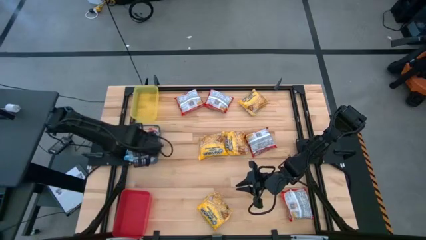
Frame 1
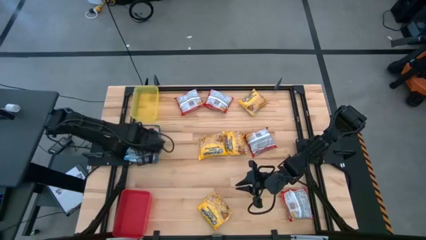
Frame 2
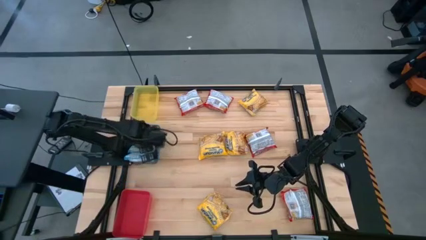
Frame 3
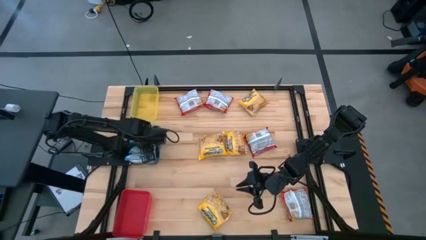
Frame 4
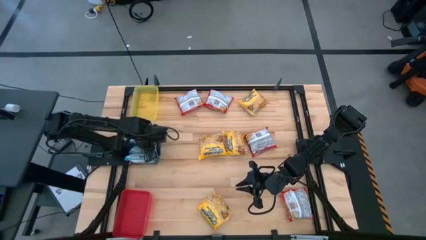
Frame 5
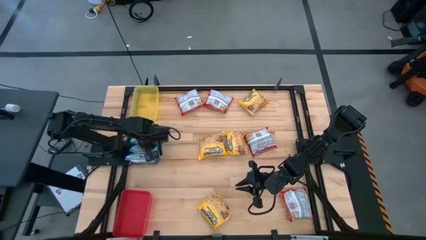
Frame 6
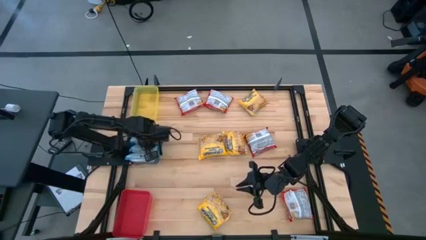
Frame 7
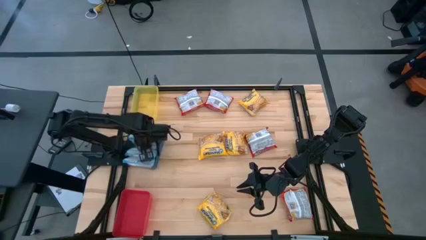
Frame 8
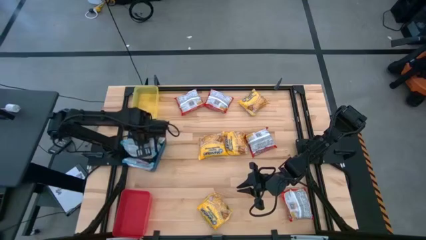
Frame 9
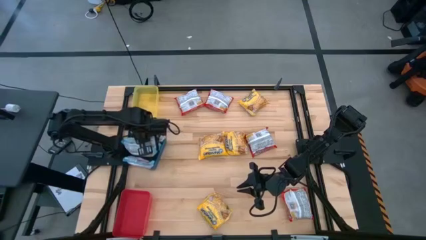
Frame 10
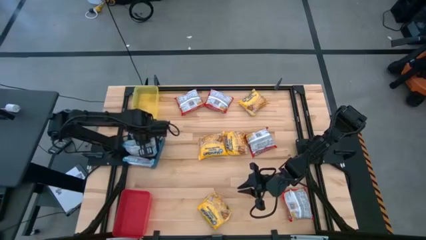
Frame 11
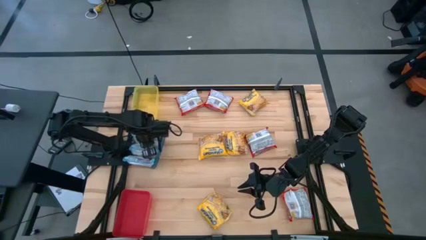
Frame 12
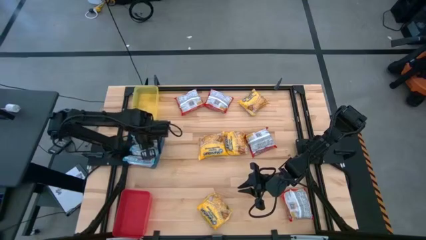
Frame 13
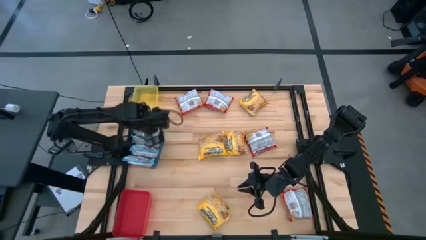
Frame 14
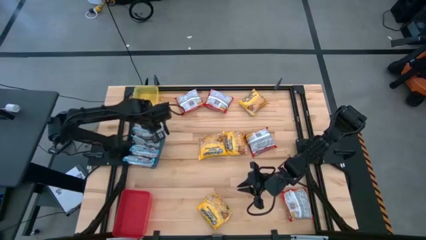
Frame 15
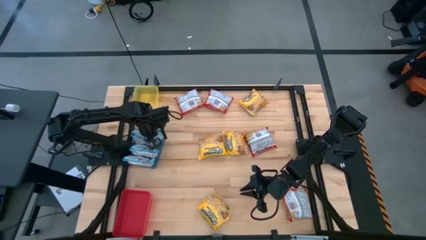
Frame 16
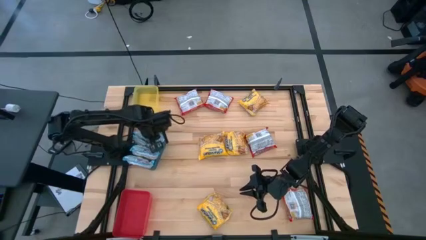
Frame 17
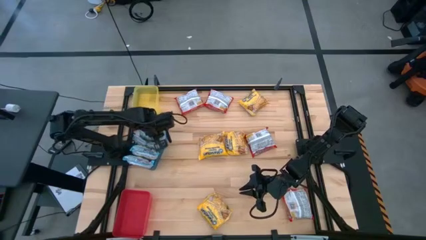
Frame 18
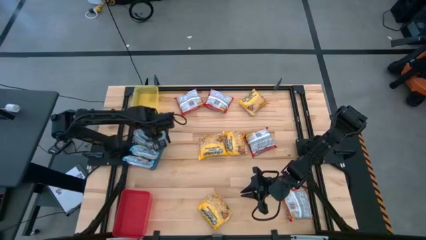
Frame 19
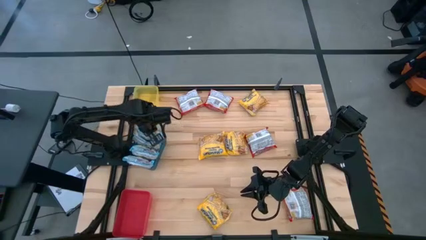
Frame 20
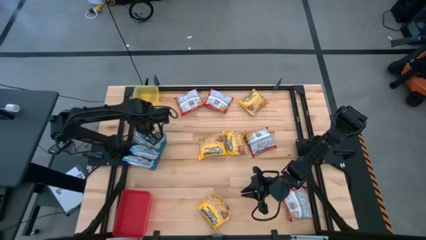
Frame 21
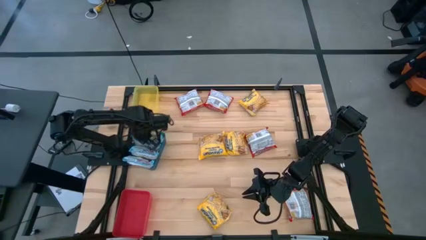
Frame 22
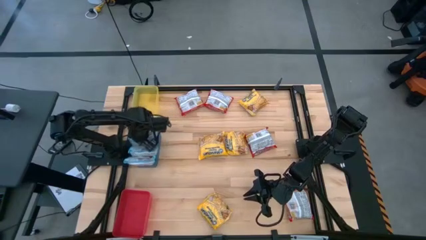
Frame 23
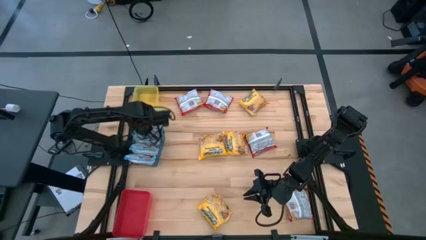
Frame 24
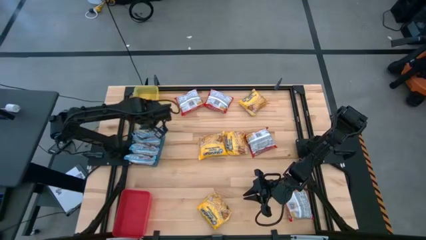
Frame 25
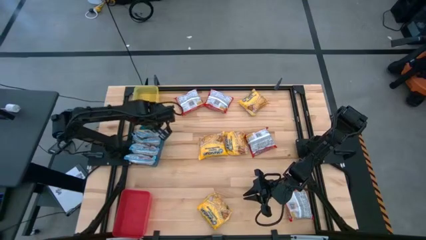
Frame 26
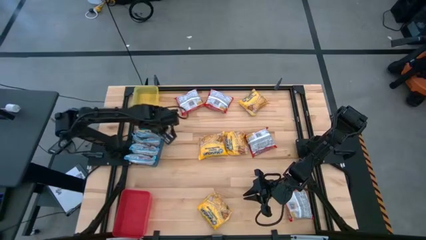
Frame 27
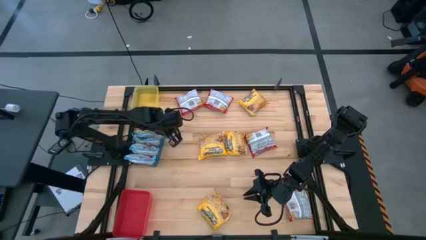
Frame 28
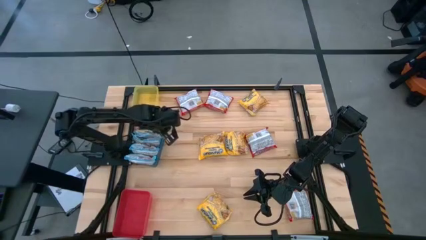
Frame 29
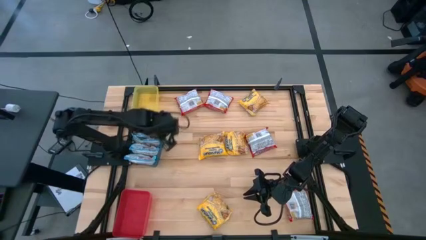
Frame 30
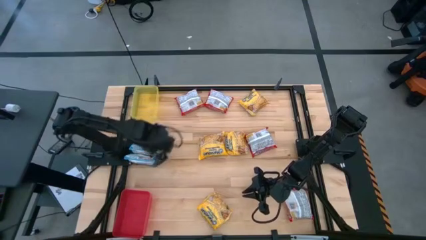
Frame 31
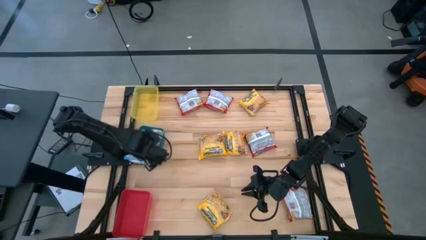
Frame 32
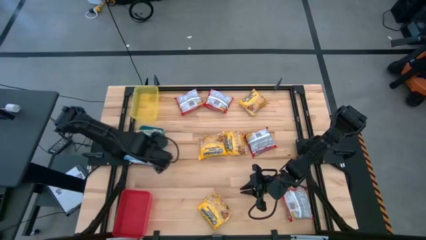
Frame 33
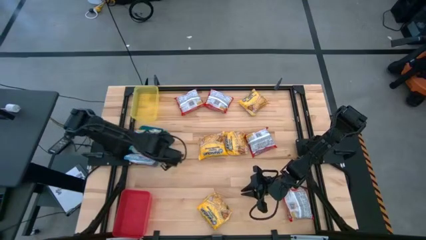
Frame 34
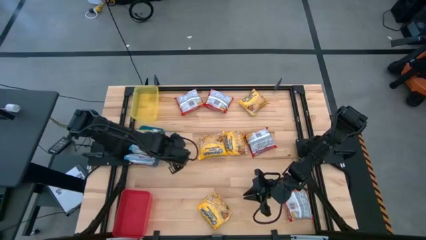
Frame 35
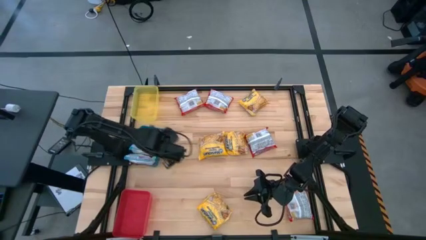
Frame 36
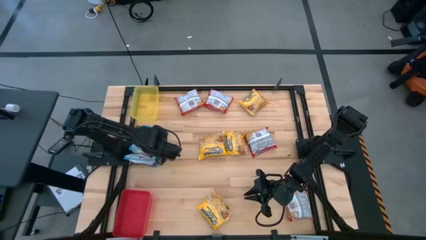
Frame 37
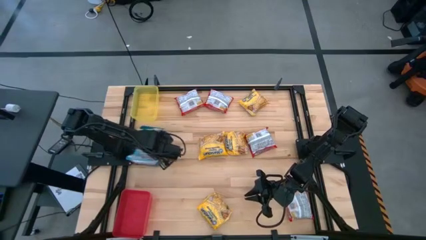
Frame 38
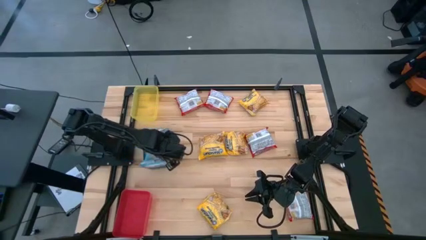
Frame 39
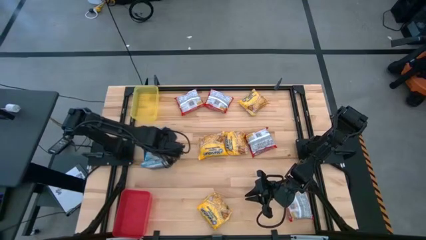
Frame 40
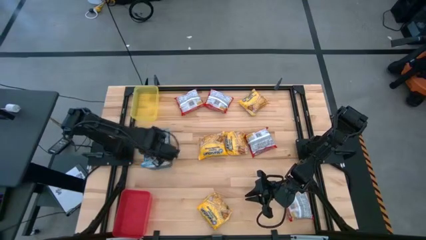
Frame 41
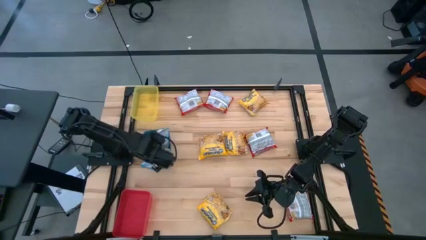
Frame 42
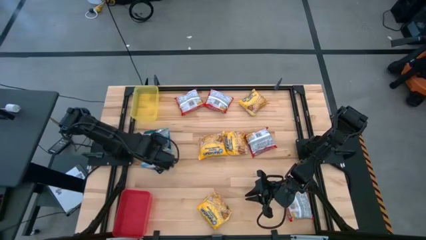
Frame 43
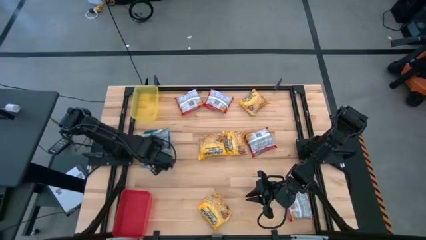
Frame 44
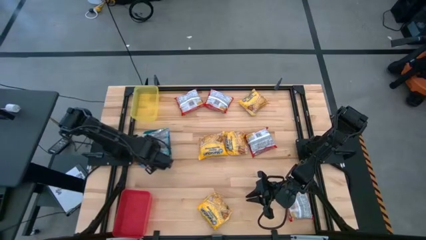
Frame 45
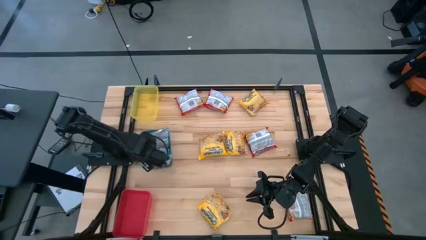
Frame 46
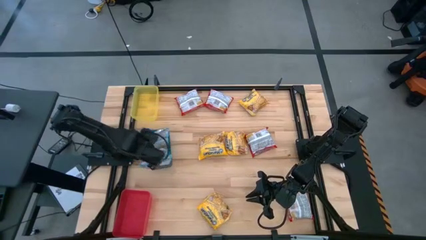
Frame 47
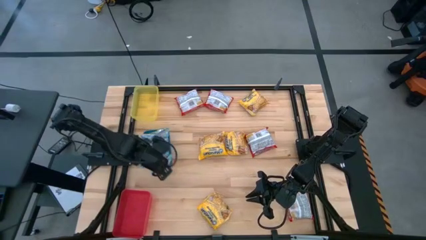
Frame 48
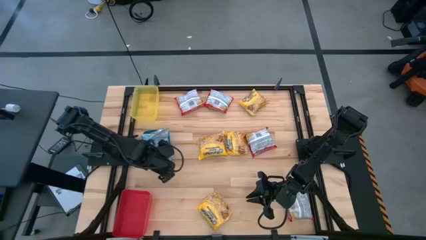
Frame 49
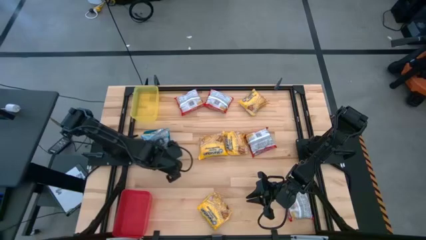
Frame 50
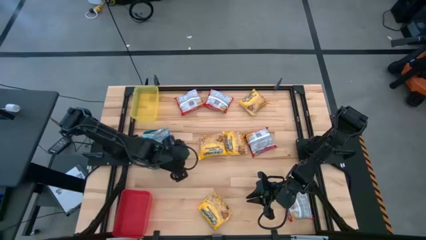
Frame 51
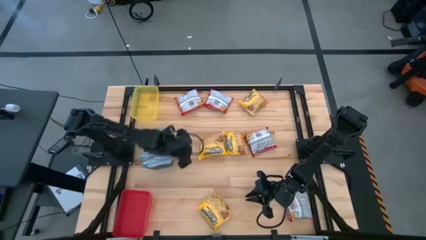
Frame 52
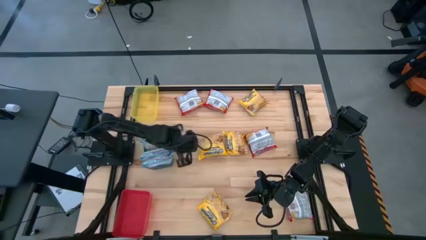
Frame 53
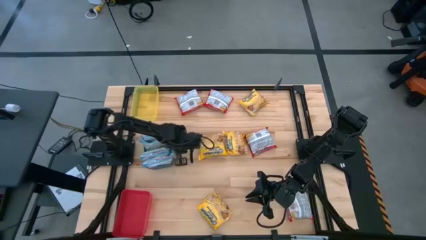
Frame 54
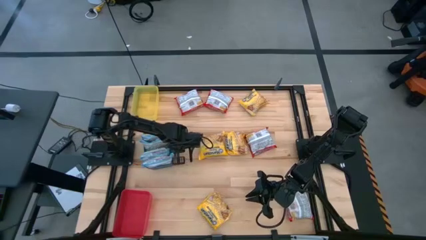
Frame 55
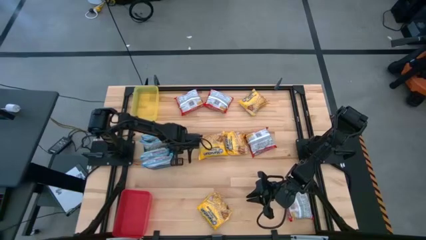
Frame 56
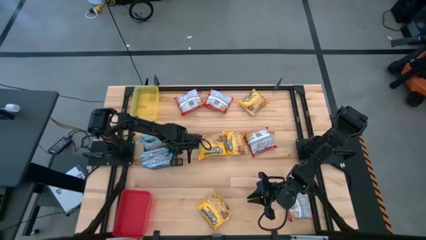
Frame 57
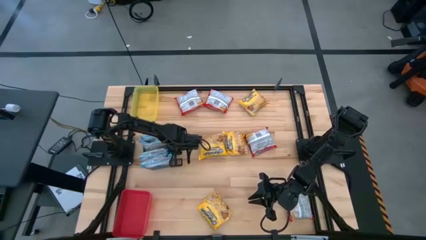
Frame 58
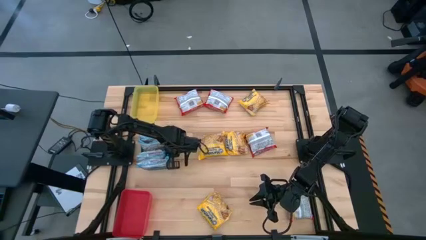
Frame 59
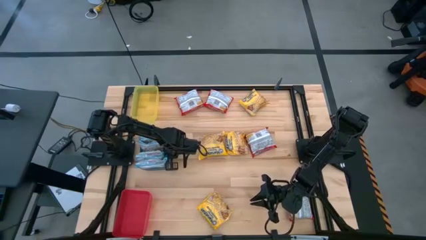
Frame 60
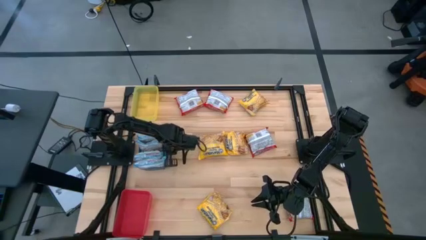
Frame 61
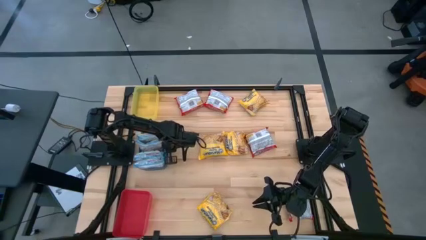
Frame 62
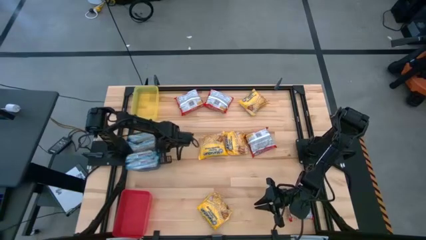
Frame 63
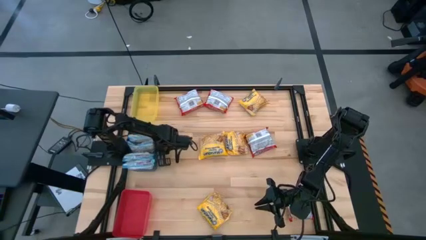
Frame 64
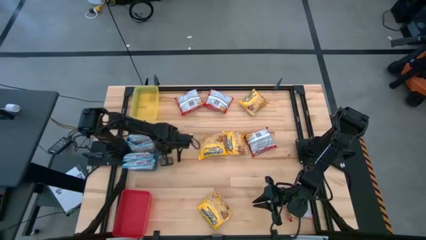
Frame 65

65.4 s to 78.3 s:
Task: Sort Maruchan noodles
Adjust the blue noodle packs in the blue bin

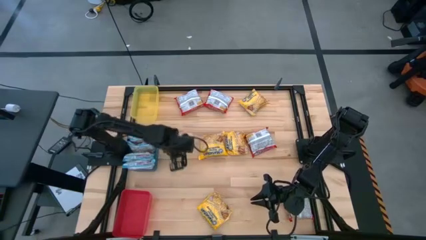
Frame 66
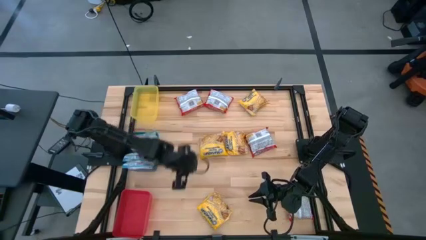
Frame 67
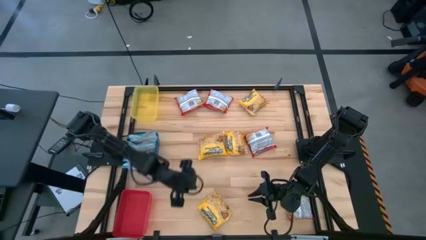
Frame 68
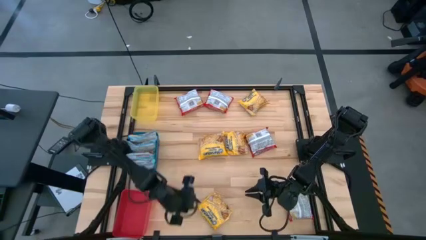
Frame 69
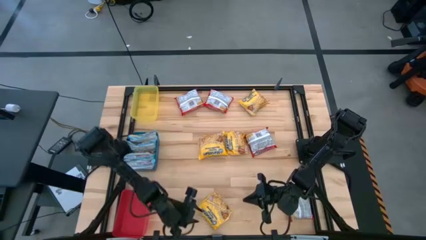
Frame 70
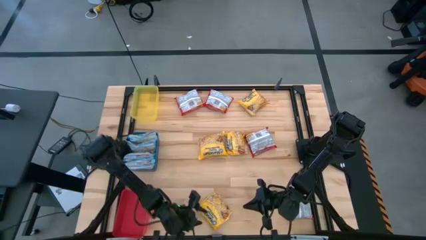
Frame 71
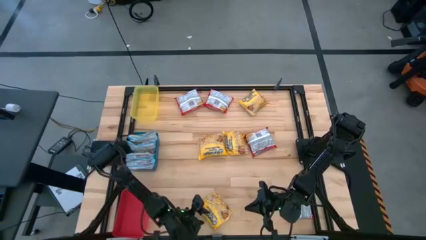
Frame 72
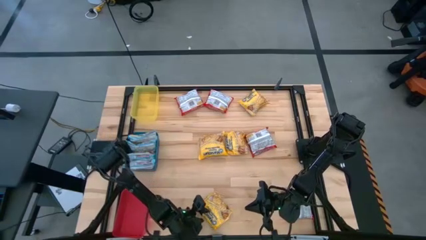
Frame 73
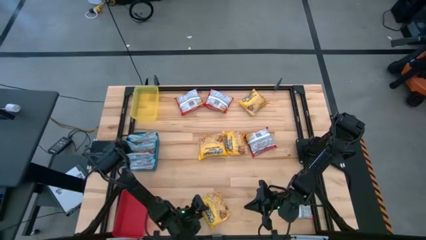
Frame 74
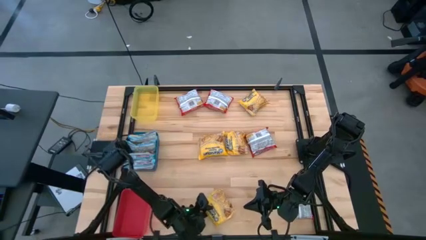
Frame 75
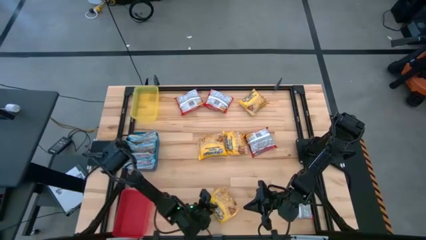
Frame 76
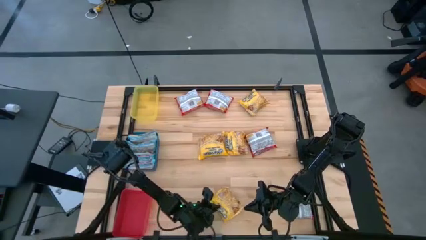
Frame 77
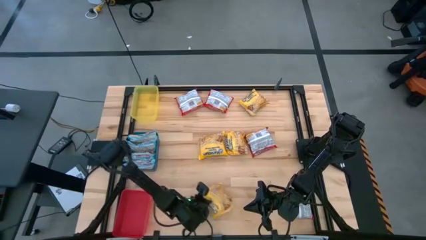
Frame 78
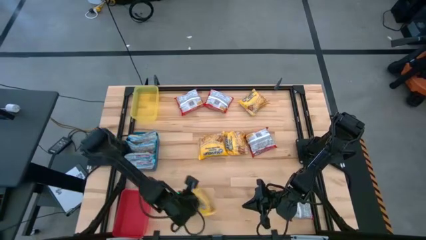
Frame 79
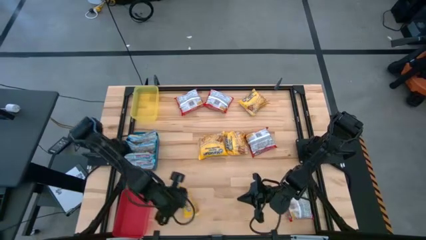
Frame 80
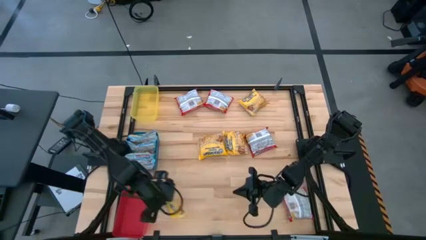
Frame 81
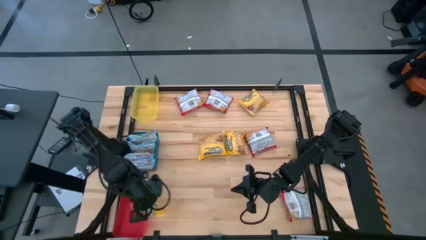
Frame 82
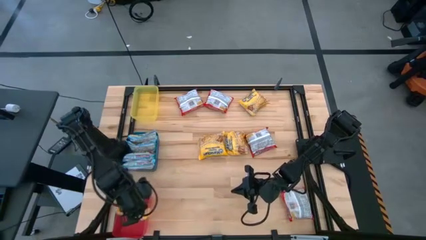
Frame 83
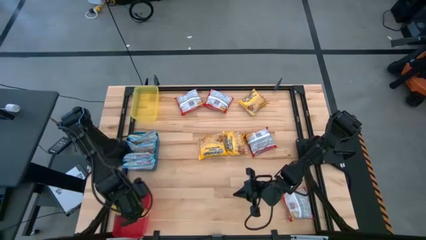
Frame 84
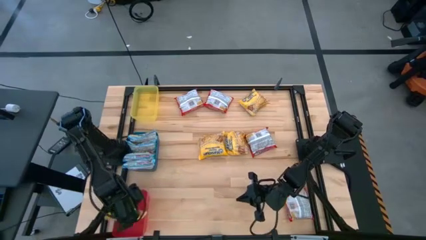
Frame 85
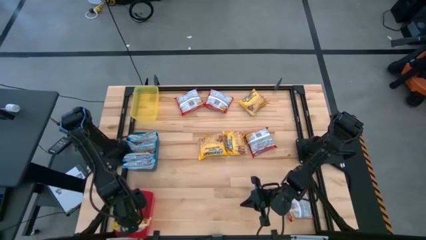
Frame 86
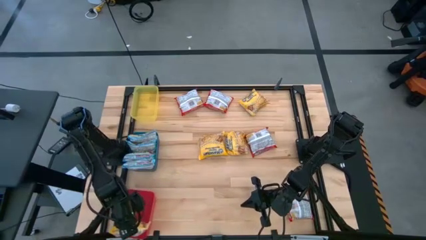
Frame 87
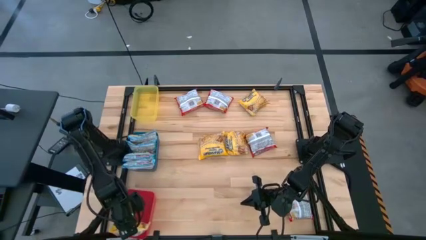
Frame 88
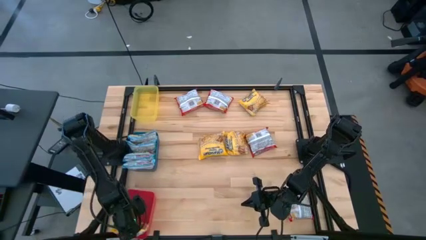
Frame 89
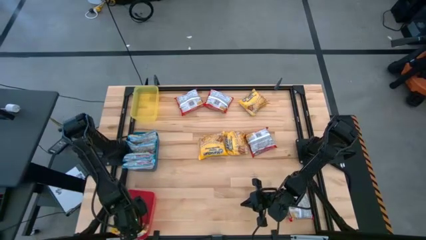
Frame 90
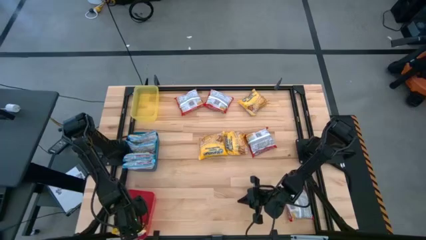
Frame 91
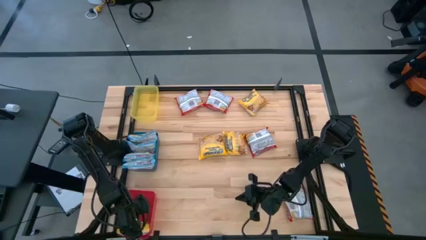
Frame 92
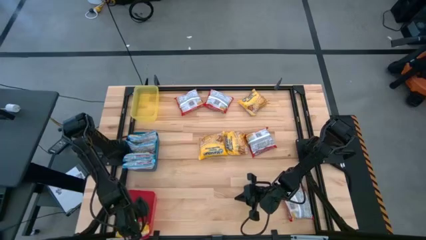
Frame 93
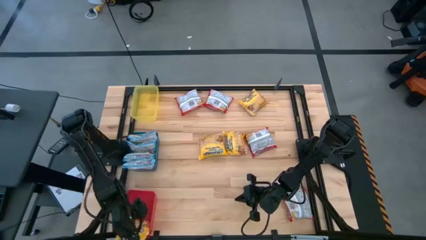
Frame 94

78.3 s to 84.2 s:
Put the bottom yellow noodle pack into the red bin
